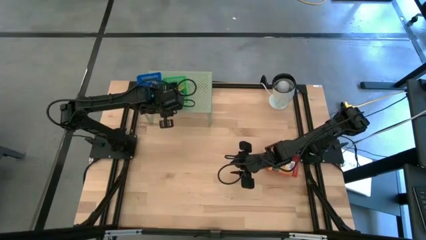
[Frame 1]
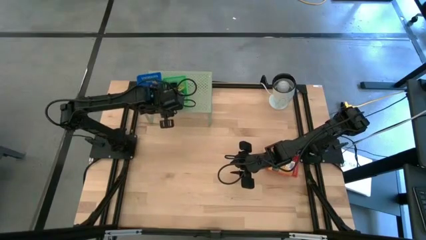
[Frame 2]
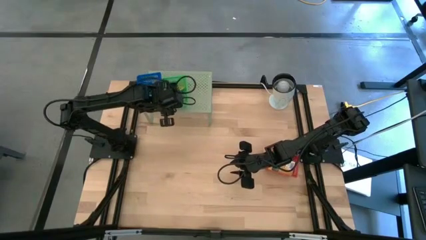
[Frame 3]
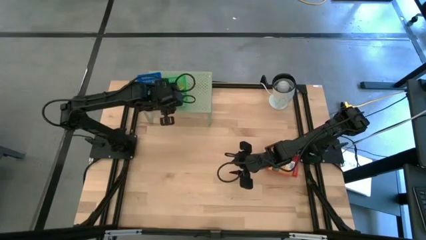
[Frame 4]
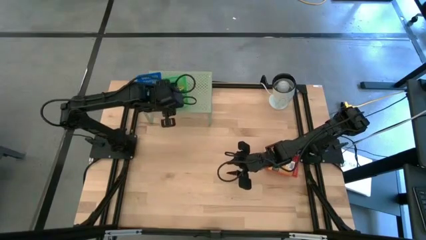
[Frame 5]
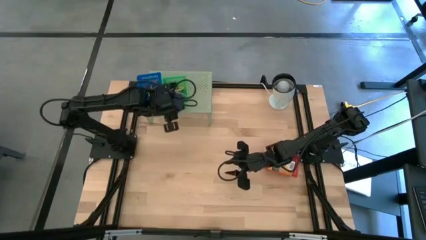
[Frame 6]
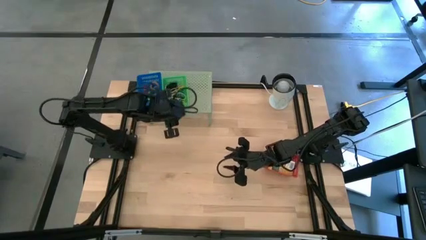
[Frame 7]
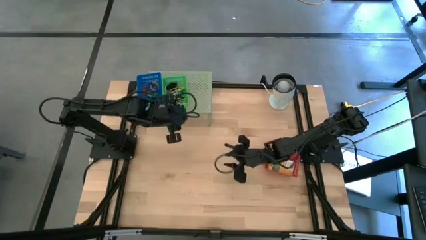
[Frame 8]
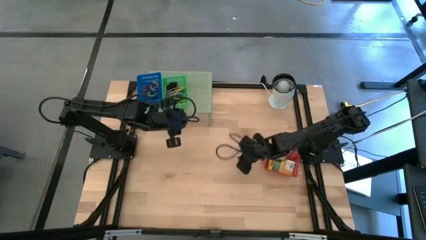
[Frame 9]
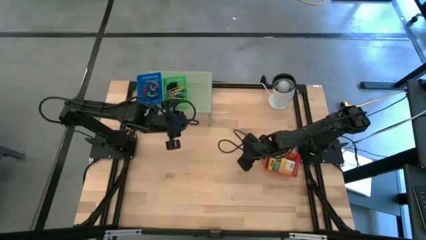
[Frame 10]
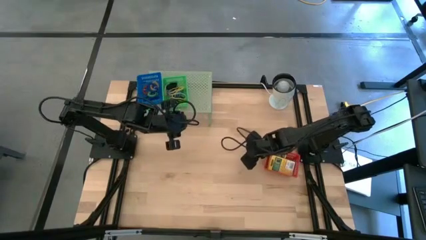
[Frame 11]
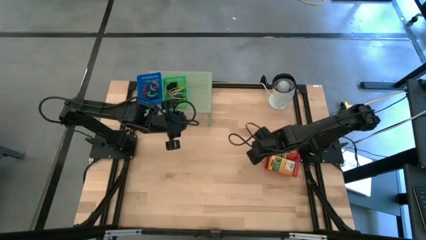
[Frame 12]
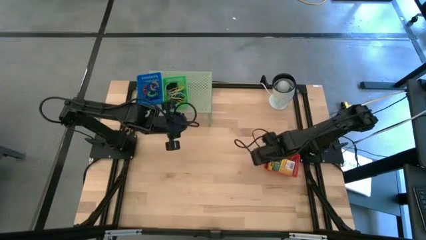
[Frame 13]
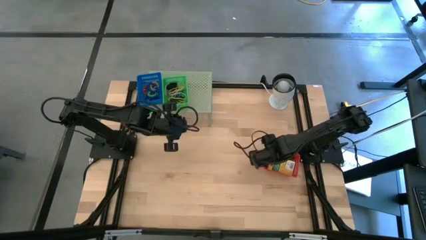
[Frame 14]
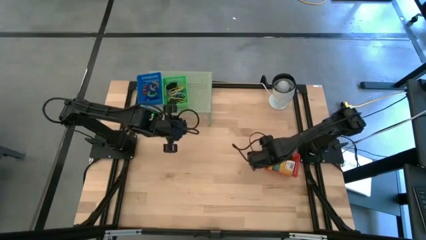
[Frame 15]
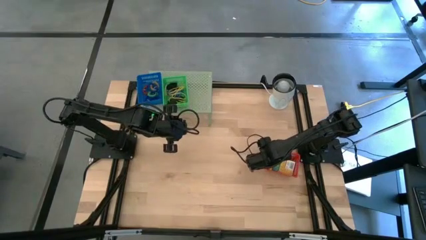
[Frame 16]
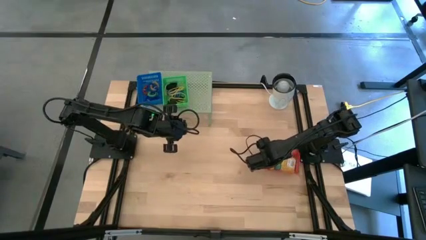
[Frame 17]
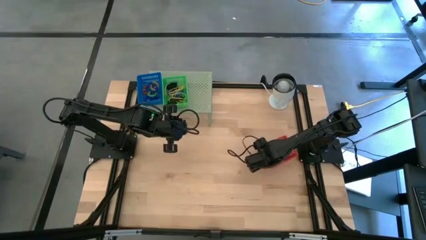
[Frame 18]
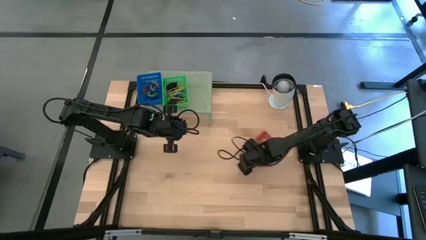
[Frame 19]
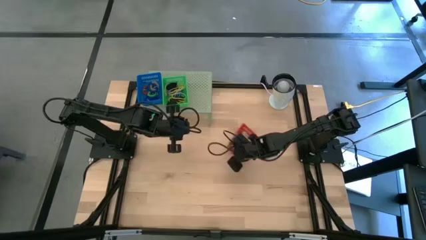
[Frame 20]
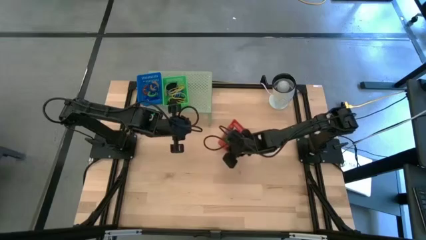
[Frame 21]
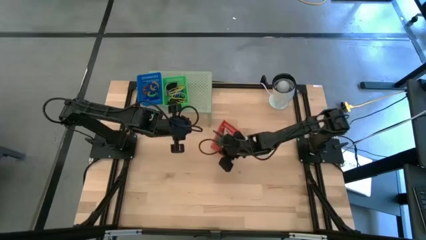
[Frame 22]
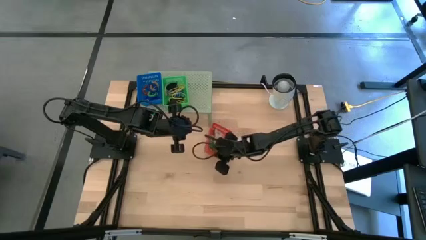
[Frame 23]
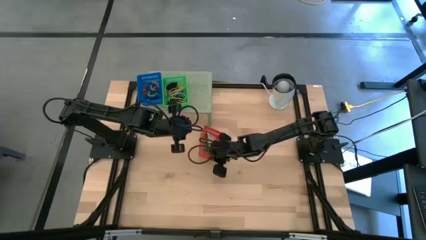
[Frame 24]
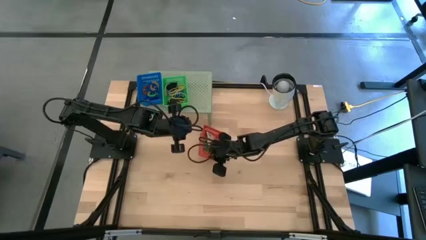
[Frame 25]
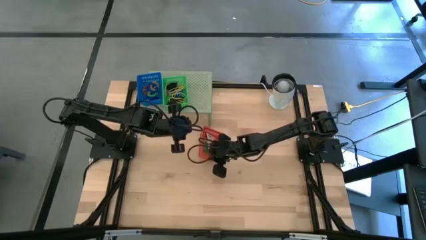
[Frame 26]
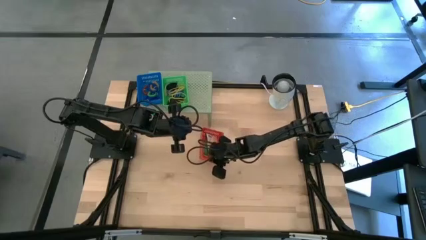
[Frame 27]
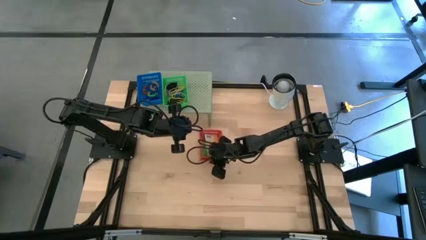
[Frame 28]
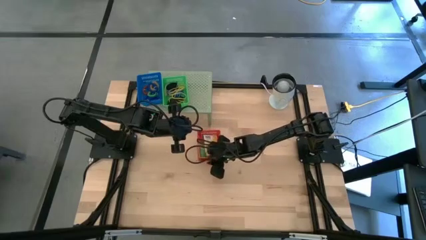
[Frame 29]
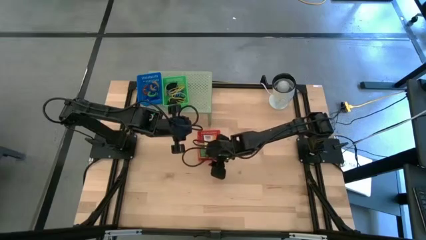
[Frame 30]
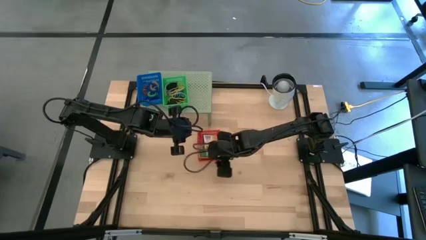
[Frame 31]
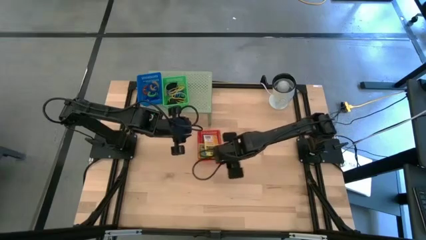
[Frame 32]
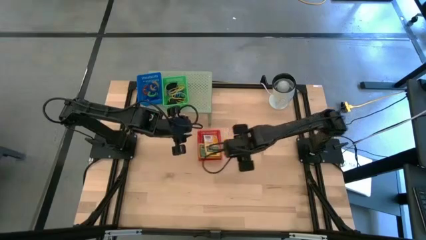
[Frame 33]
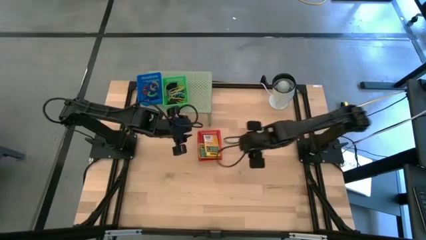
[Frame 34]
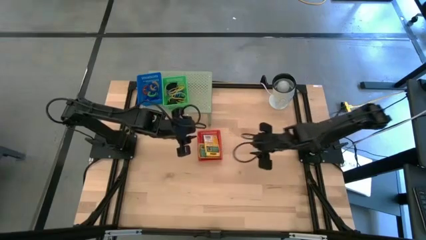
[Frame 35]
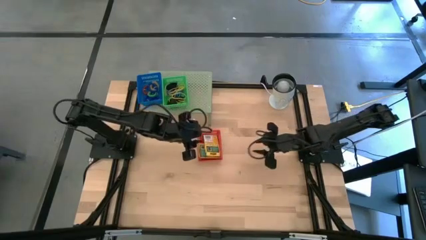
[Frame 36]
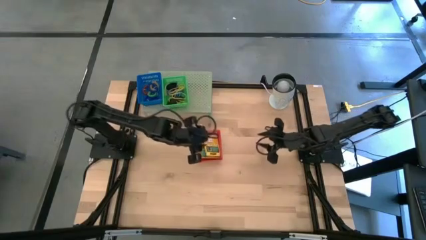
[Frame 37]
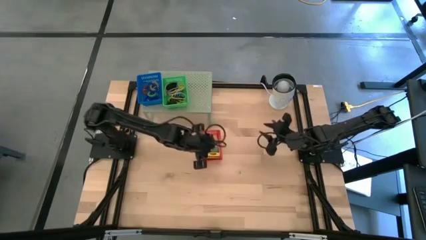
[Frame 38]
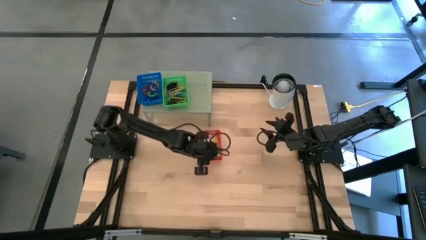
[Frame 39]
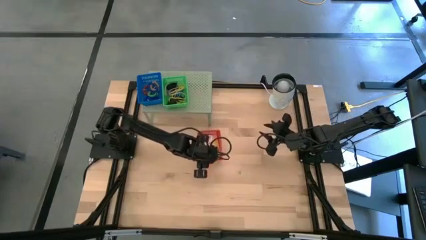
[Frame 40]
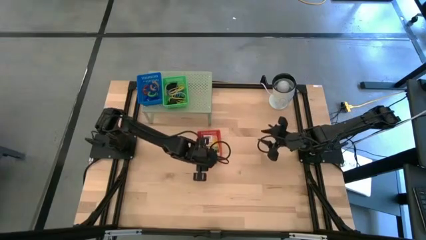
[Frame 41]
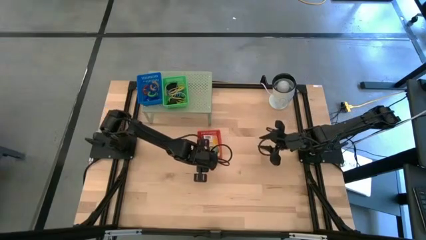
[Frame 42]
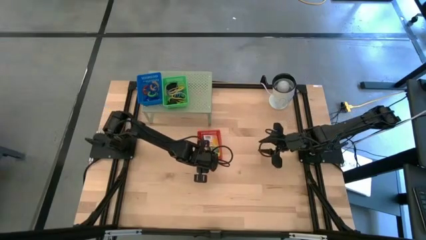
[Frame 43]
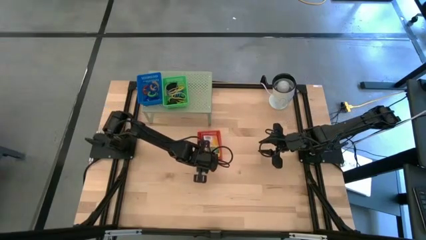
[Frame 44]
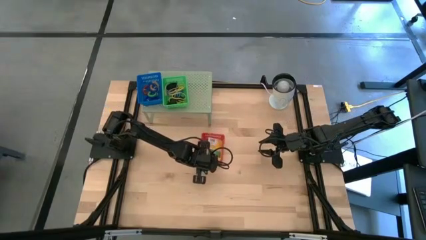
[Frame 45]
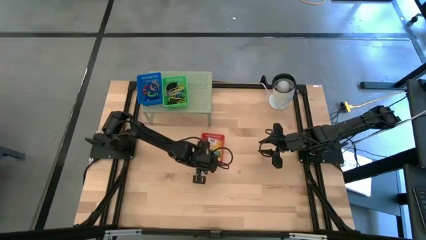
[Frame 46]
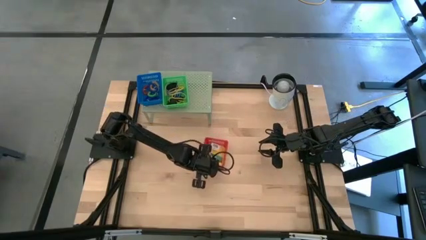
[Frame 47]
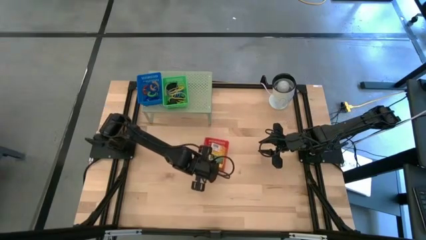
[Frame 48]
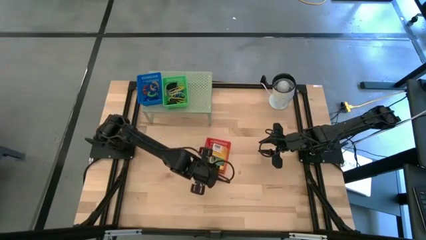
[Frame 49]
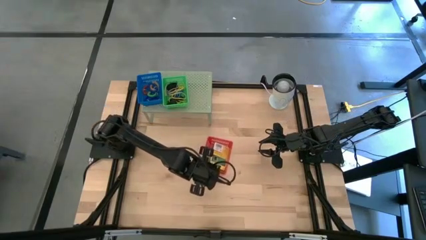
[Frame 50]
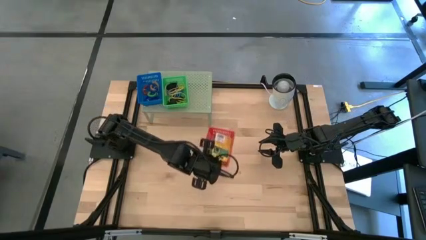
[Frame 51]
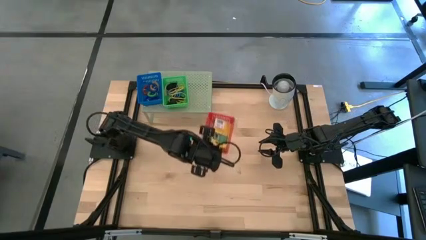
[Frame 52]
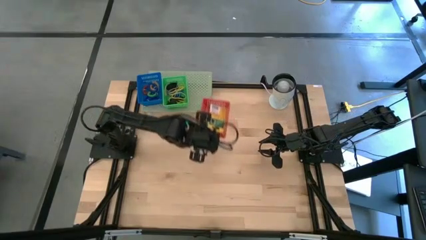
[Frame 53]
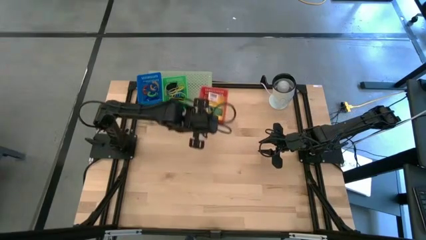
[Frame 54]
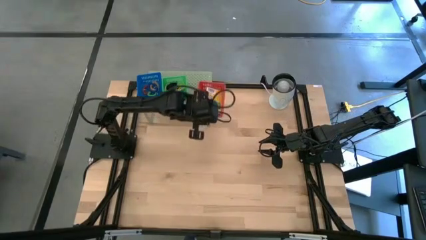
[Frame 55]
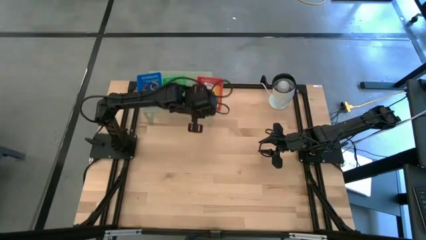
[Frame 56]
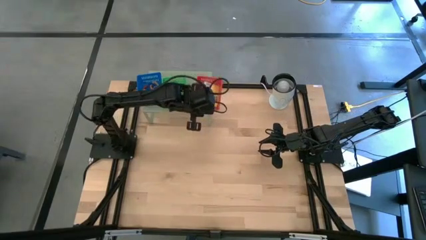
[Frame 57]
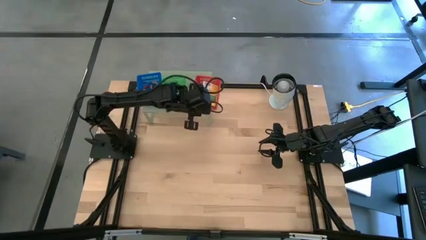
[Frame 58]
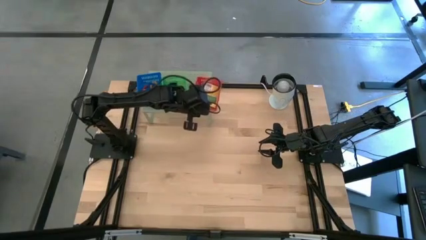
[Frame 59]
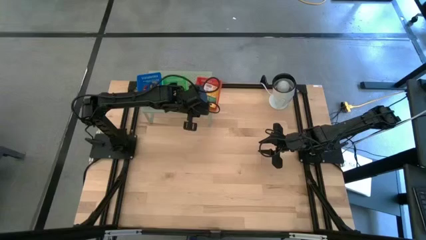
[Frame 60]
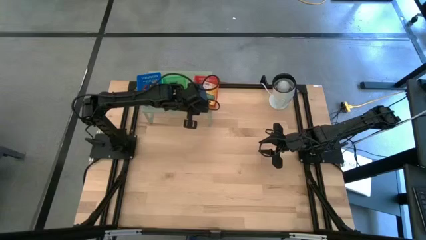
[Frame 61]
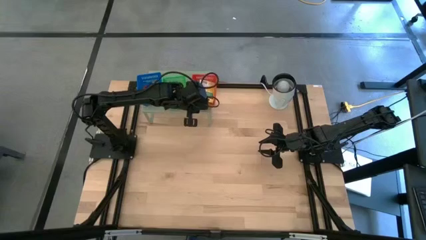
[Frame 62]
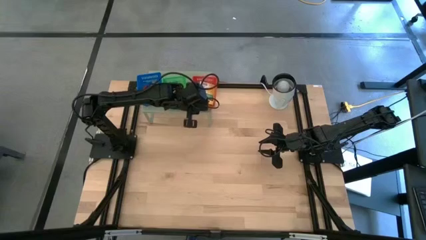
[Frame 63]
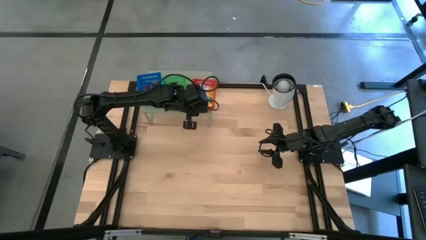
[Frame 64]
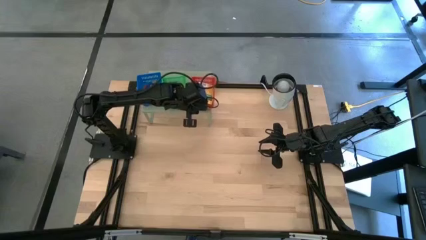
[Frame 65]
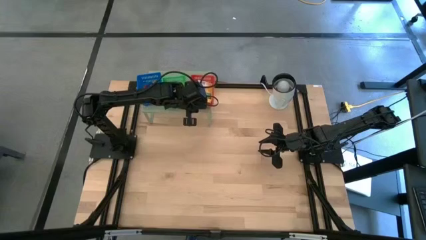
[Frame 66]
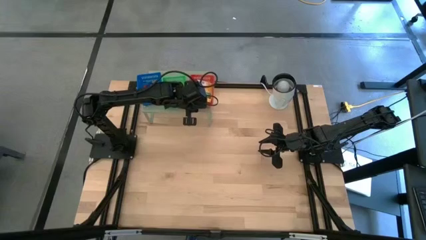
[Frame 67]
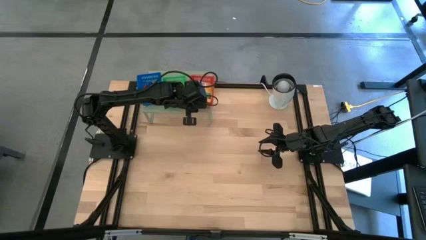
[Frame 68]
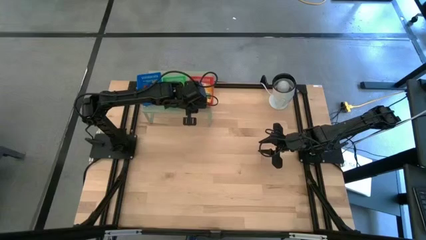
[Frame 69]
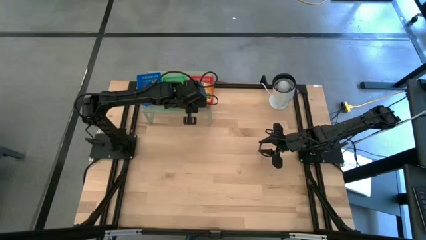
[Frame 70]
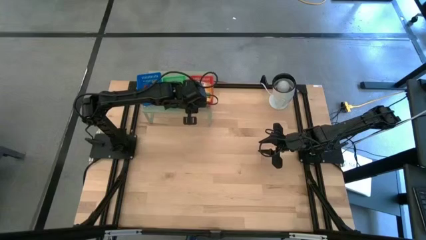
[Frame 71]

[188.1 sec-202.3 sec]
Task: Pick & Place Office Desk Supplies
Put the red bin on the shelf

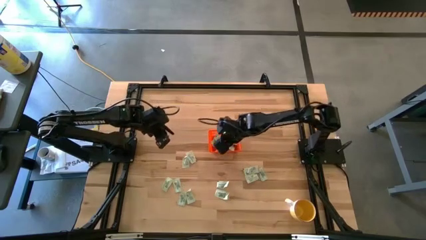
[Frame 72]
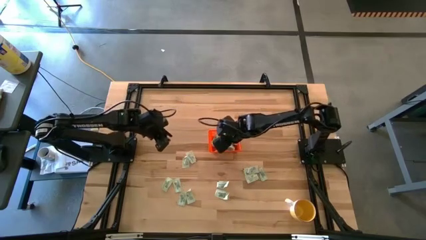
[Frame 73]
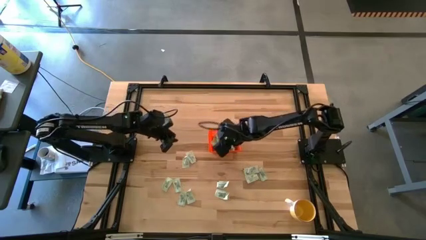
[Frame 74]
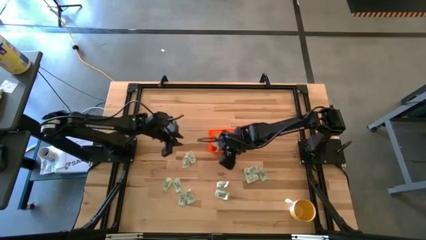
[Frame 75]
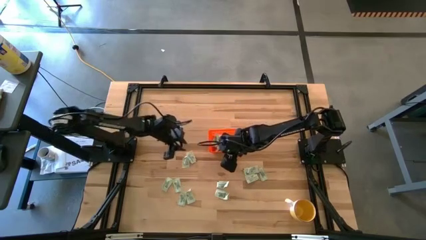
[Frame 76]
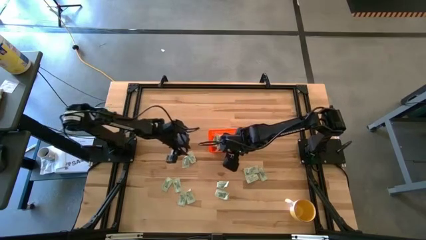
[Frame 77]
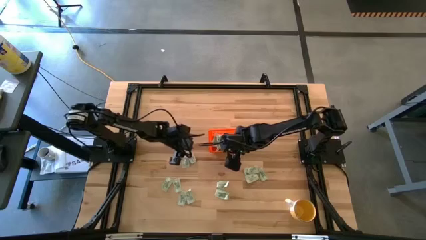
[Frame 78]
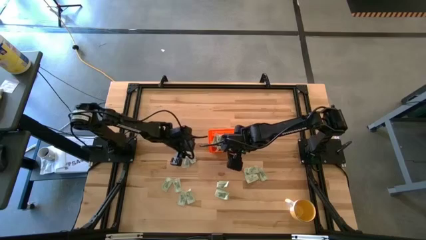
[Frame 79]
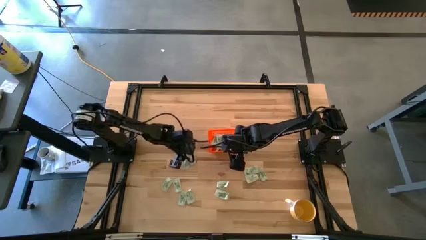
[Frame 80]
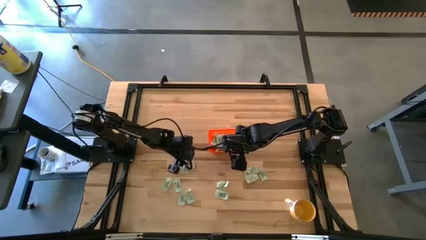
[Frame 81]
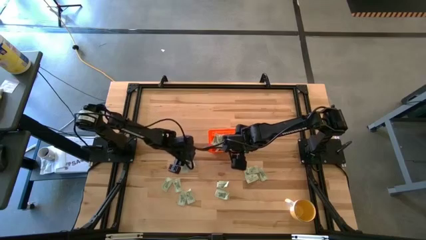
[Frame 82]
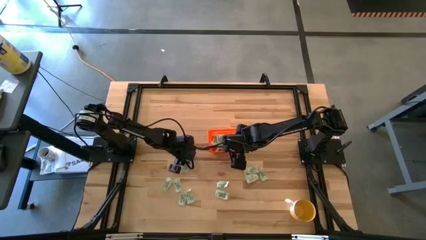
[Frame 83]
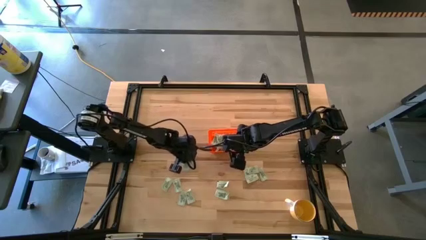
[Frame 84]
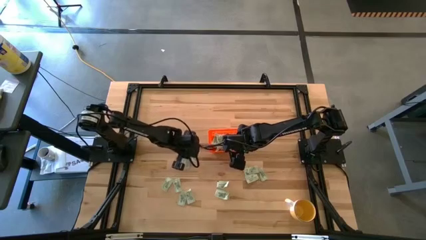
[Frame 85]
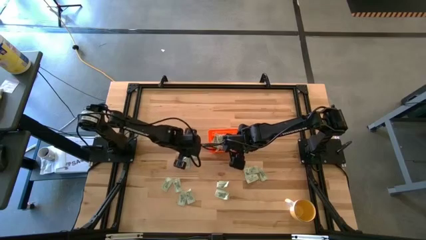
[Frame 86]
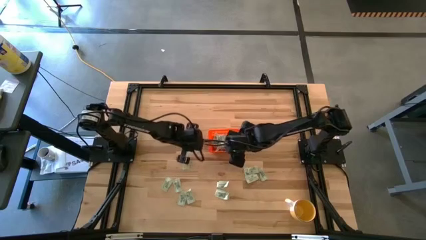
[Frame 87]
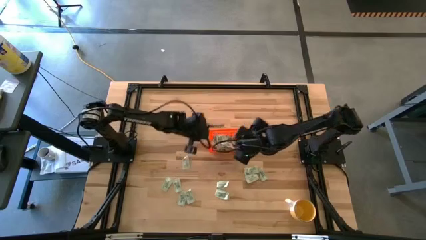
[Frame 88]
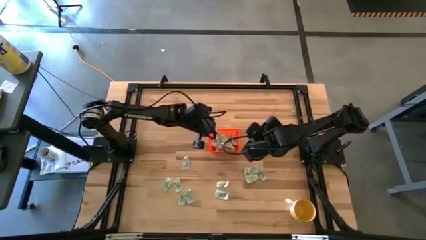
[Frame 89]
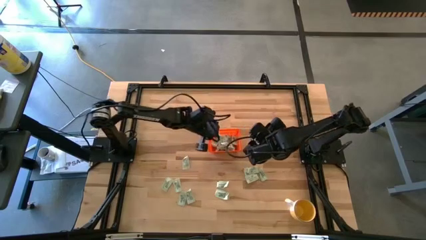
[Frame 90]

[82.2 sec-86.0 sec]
Task: Pick and place Stevia / Truvia into bins
Put the light green stevia packet into the orange basket
